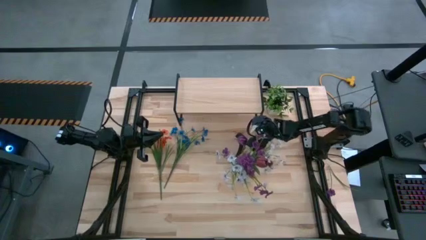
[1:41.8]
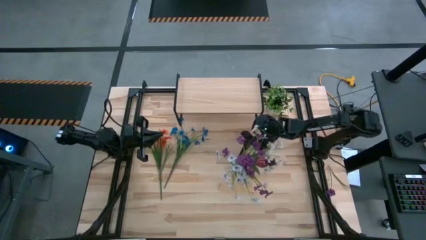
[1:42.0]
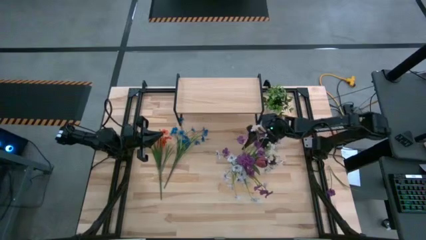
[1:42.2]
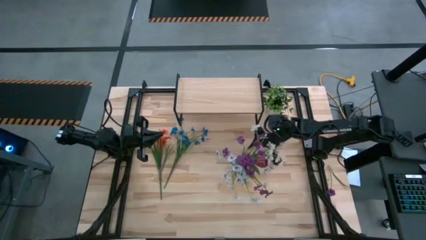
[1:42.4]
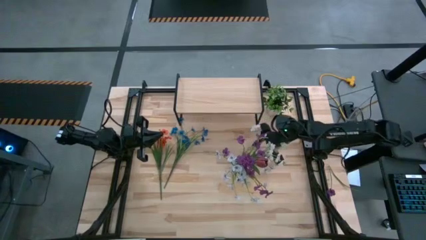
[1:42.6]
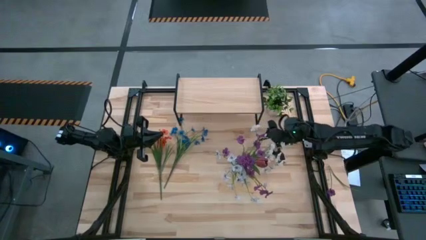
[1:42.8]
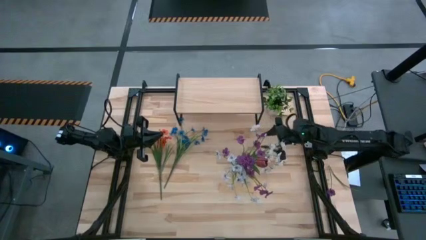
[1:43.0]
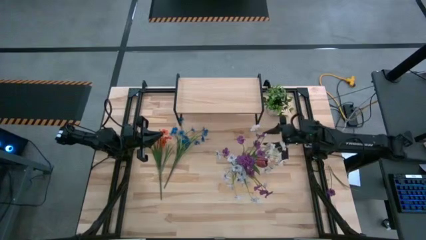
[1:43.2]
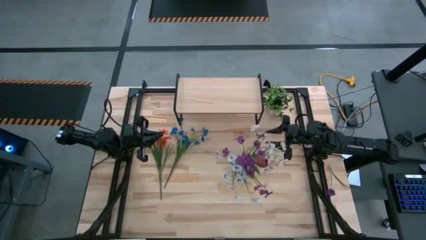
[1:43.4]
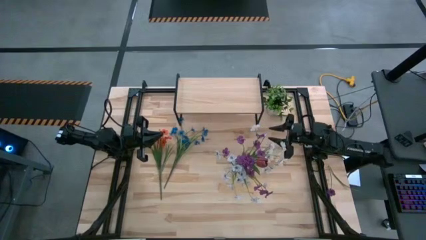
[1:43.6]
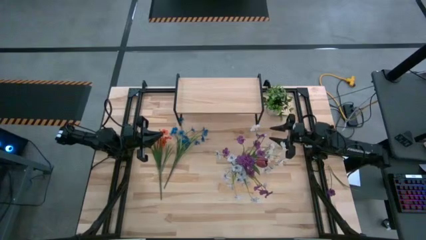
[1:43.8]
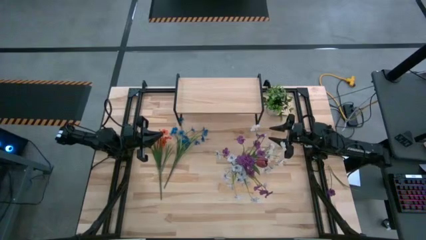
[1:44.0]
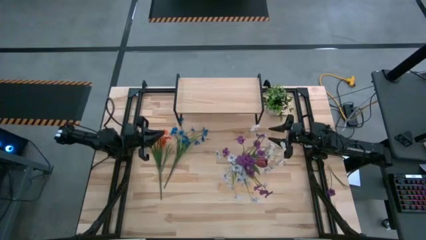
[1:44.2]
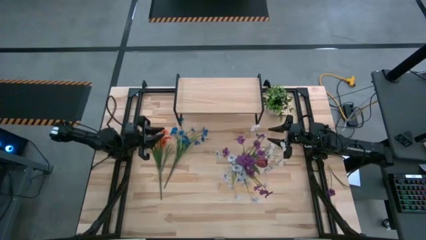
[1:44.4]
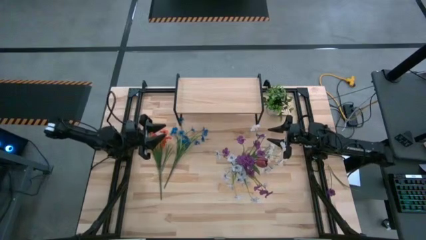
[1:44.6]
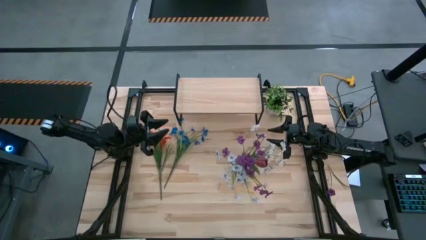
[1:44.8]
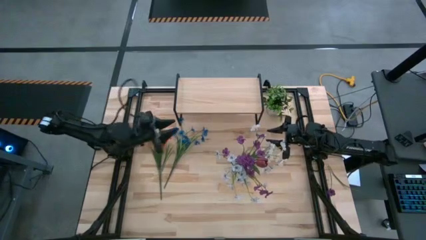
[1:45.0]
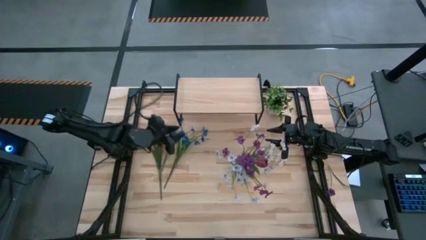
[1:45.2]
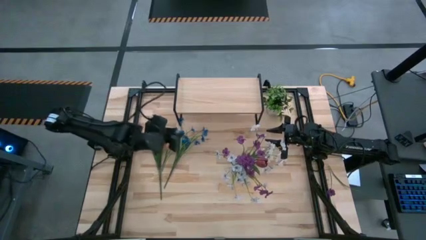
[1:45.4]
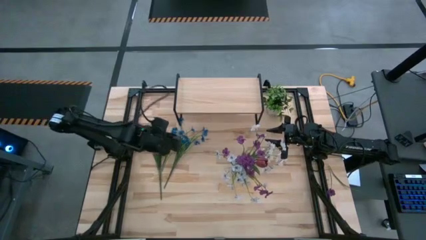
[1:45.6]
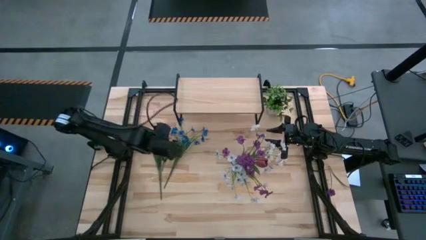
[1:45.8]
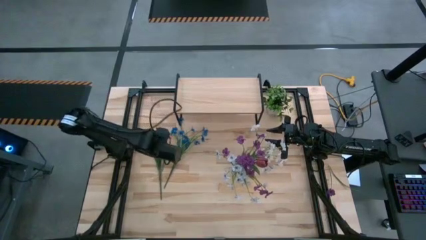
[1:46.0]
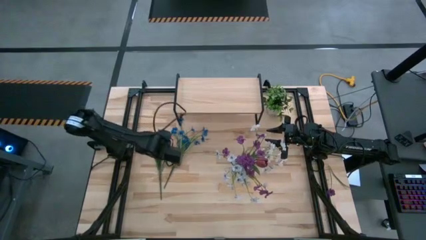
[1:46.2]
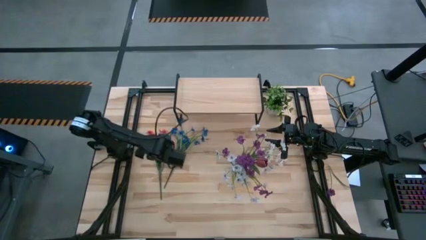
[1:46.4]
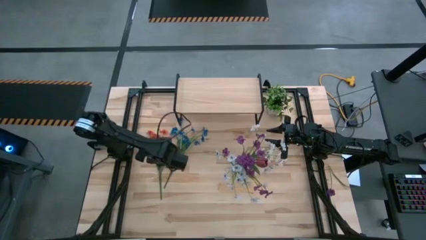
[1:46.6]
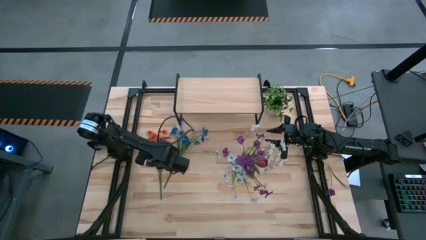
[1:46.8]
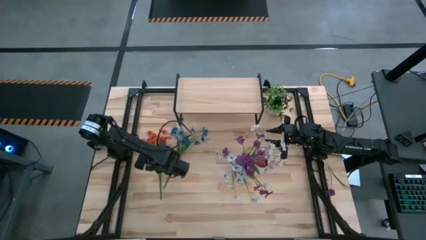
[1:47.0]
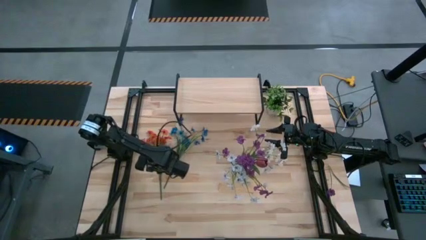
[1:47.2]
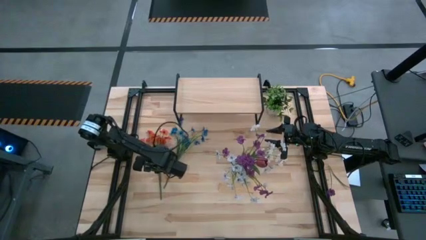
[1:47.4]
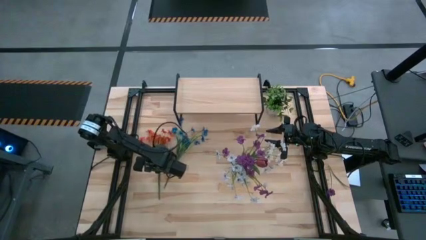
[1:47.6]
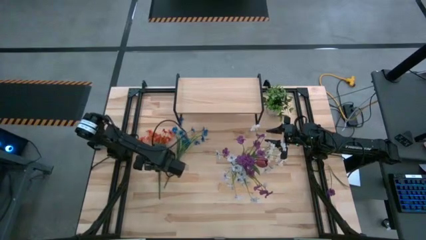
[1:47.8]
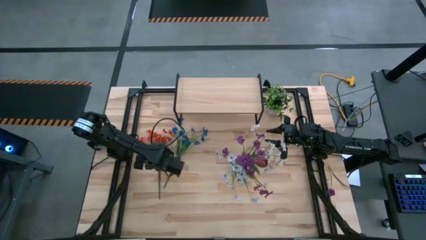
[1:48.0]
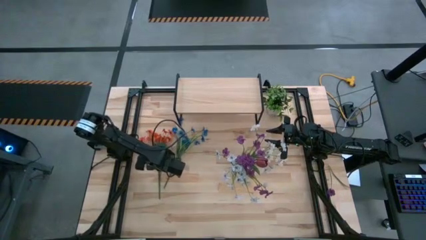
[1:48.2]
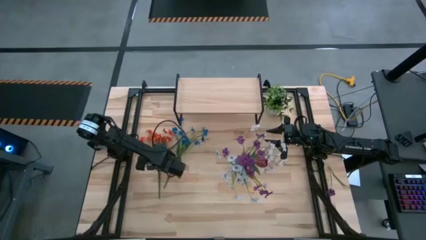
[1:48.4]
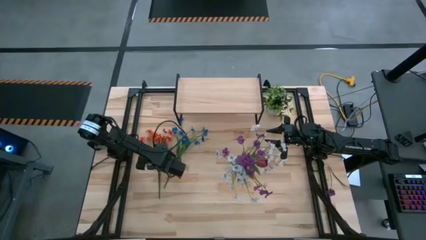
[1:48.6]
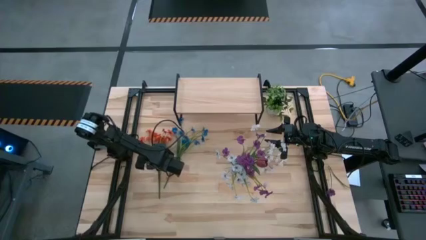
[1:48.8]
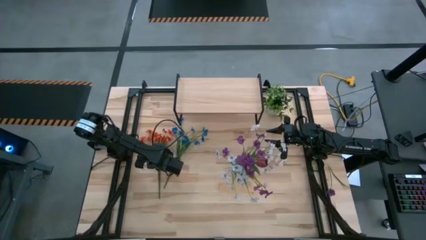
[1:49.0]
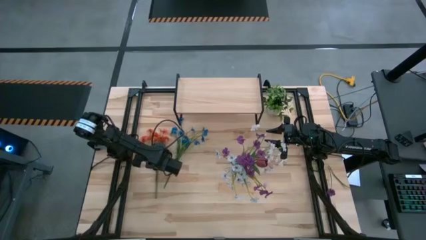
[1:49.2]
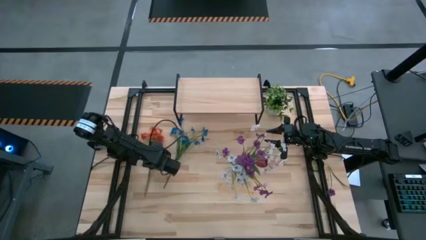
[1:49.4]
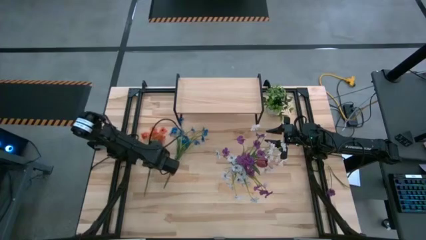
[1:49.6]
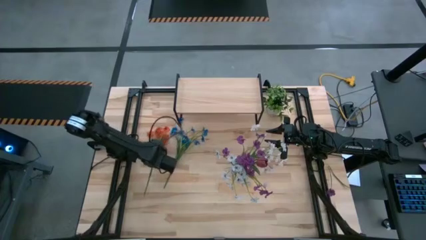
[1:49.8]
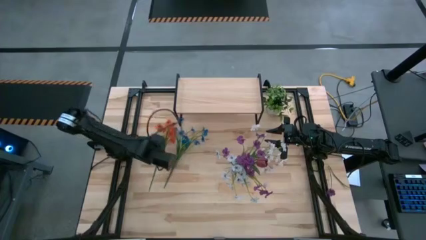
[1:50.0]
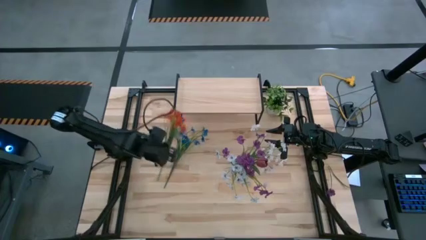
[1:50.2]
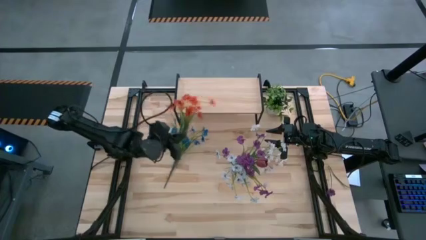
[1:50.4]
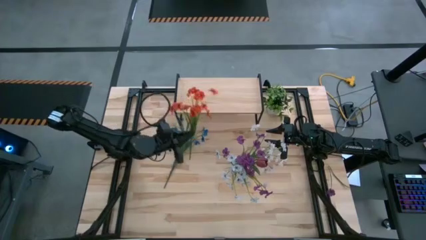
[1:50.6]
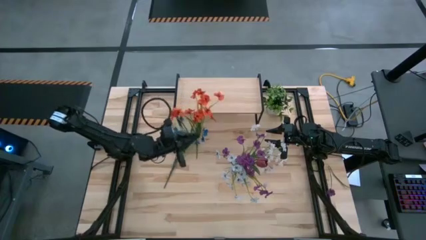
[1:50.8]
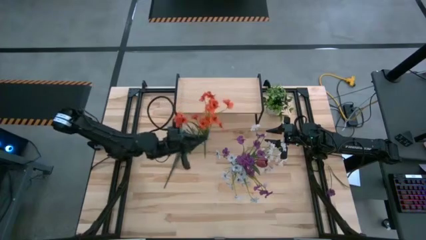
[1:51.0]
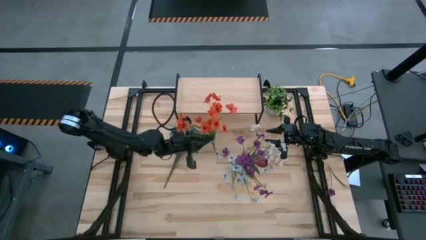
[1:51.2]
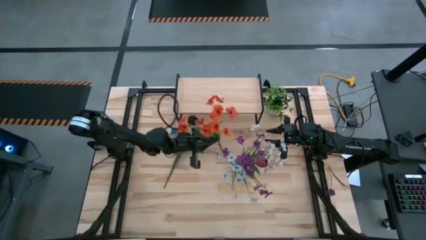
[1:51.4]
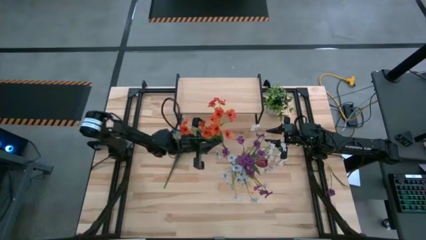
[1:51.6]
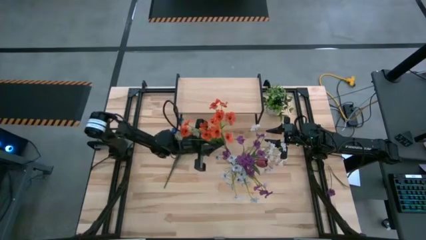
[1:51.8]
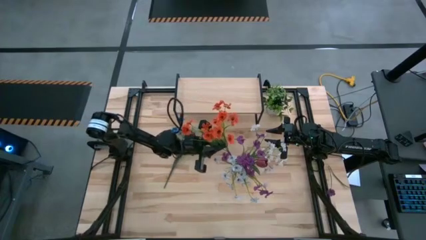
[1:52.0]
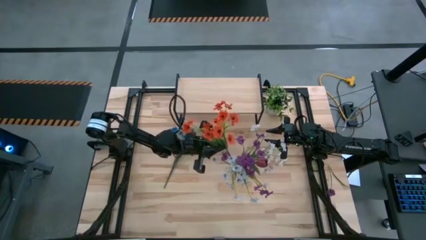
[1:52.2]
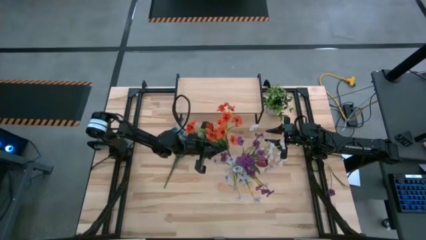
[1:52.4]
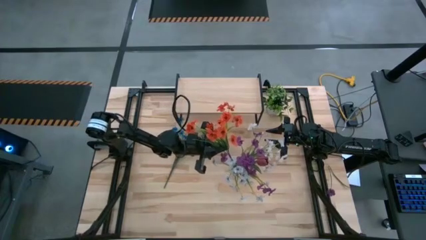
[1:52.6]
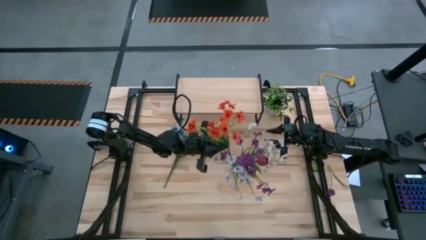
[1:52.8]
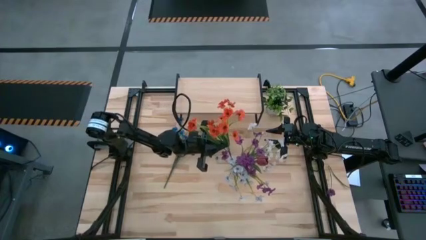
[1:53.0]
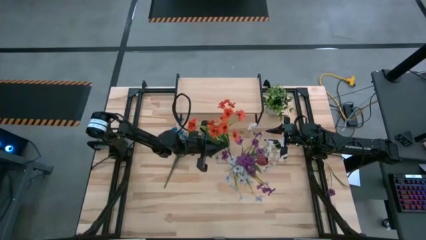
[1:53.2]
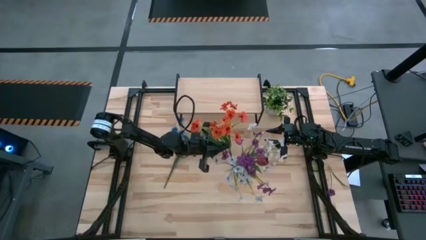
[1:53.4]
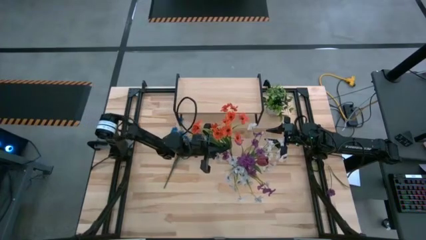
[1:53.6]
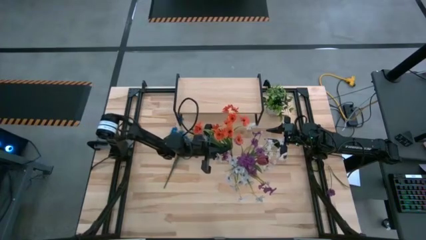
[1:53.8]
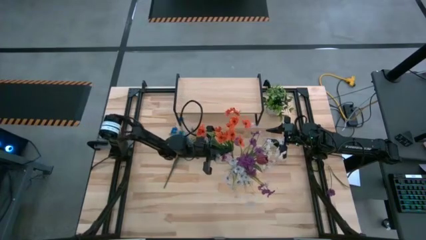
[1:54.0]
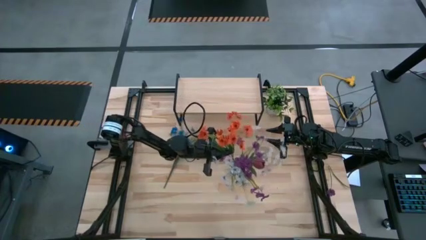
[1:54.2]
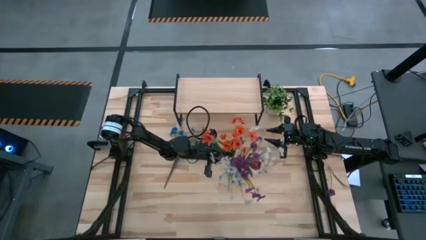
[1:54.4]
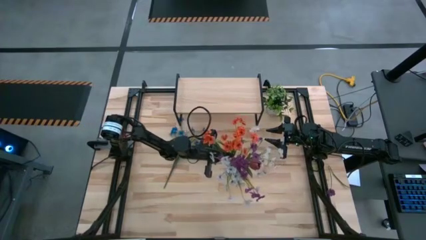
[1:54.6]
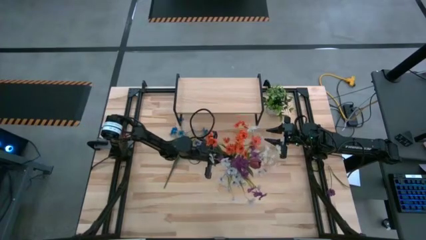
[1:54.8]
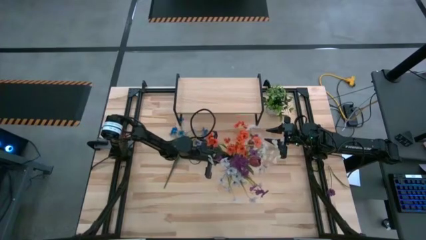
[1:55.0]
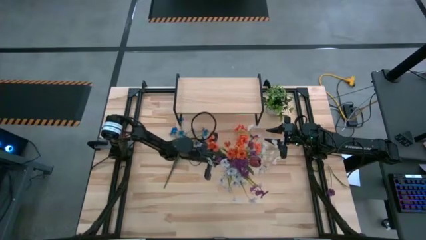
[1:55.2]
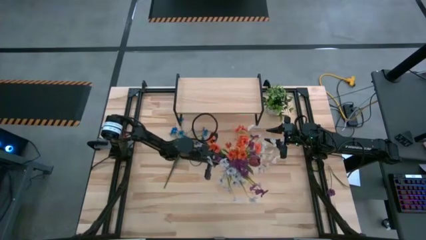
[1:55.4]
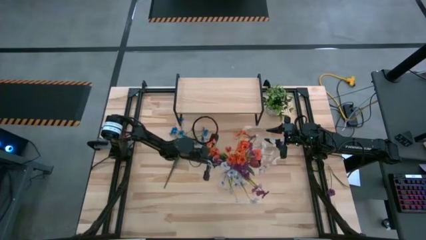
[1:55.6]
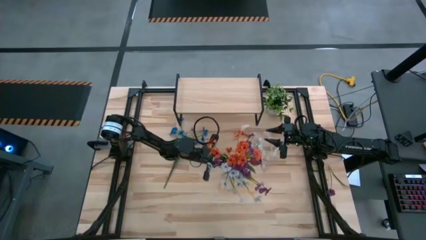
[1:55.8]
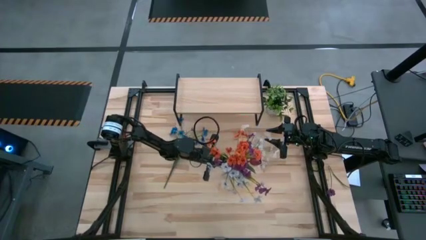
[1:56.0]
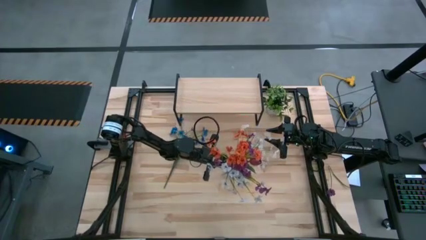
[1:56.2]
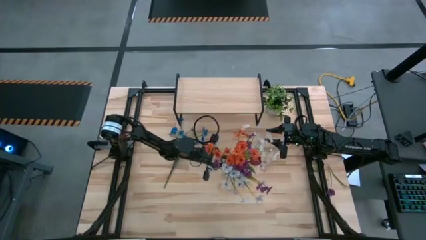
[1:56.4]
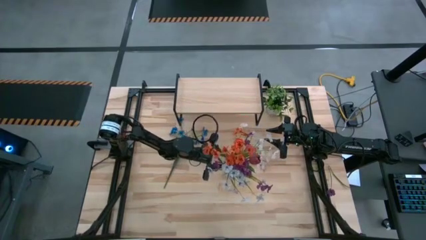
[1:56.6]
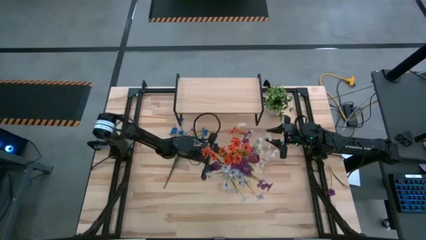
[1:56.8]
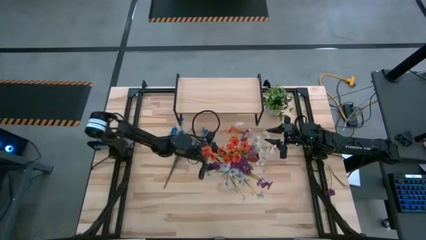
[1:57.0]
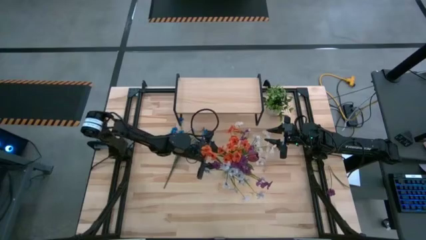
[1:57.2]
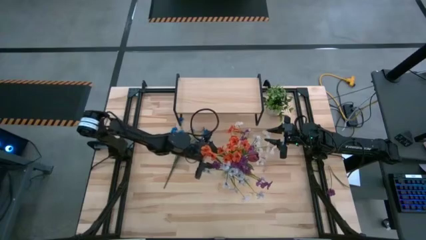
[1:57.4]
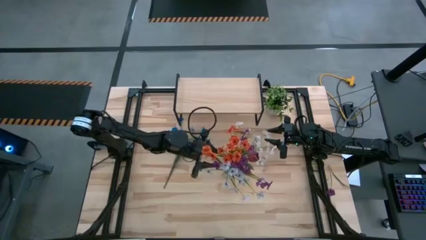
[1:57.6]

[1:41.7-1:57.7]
Task: Pick and place flowers into a vace then onto a shelf
Put the orange flowers into the transparent vase

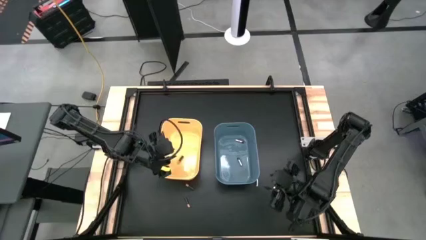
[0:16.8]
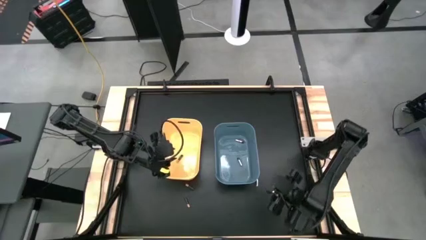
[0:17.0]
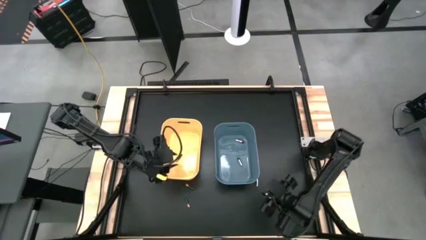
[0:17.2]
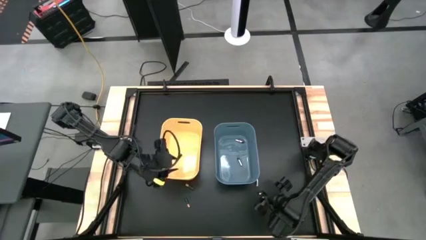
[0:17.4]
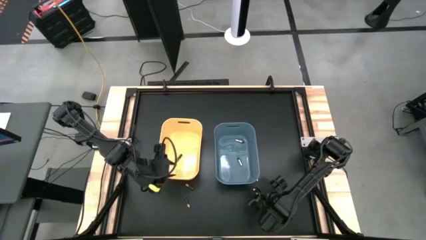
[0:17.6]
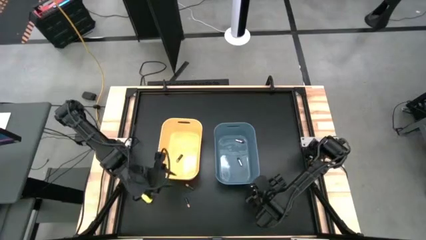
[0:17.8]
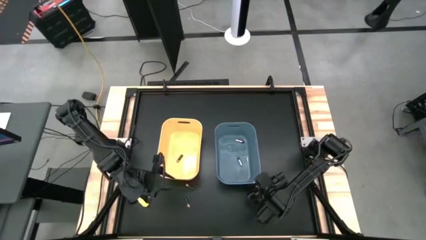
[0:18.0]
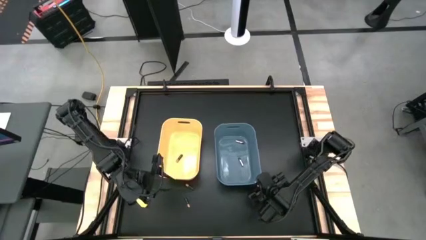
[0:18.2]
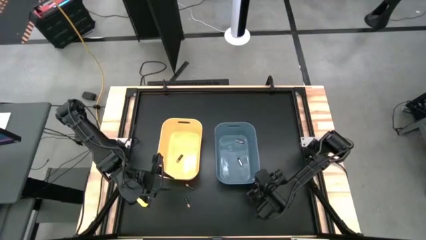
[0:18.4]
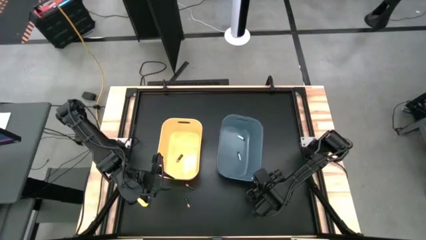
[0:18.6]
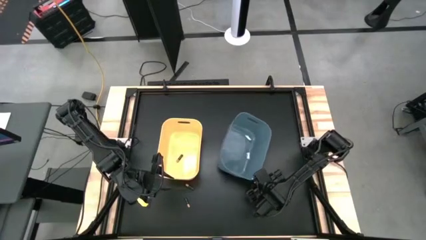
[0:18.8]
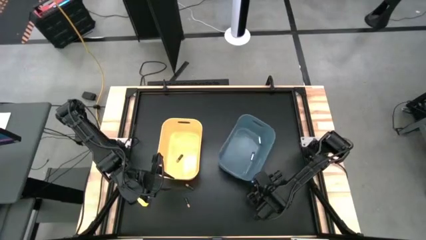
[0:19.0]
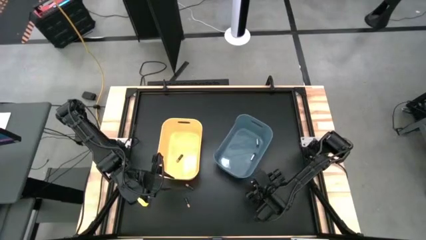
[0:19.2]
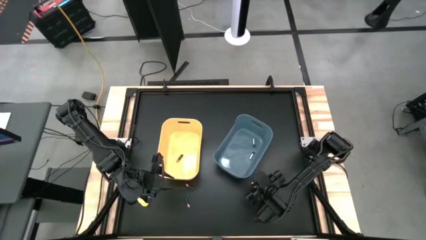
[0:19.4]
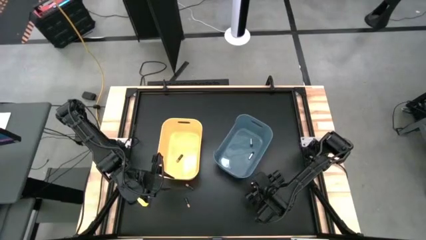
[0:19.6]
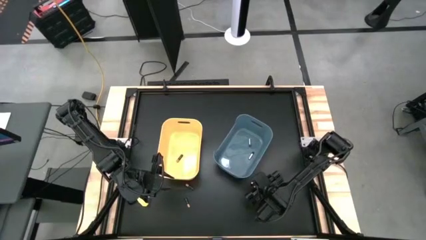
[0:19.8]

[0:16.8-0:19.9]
Task: Sort batteries
Put the silver battery into the blue bin
